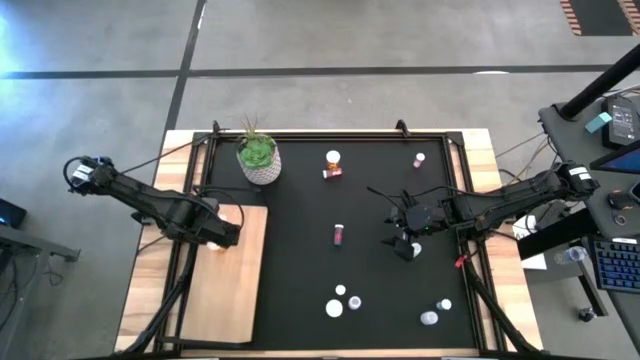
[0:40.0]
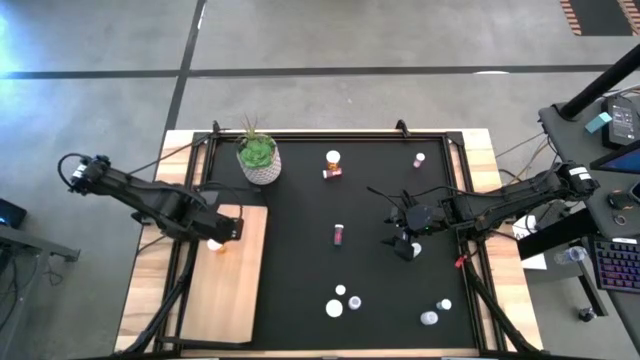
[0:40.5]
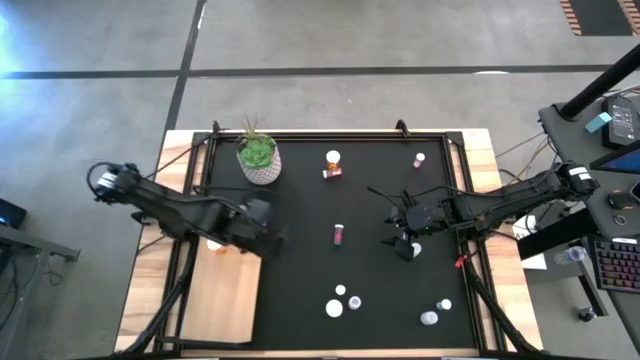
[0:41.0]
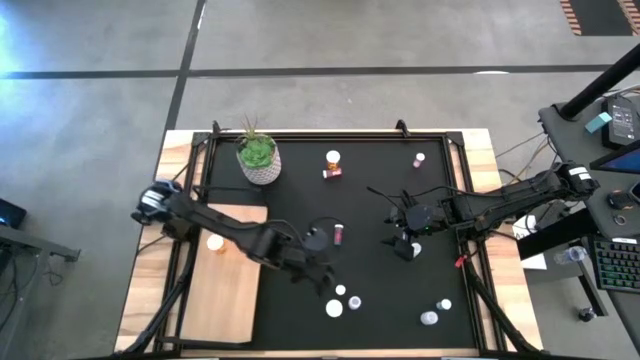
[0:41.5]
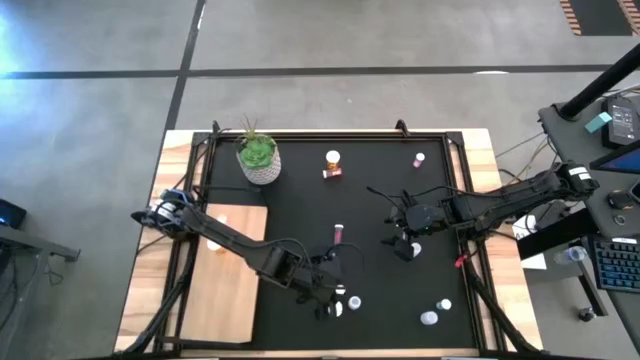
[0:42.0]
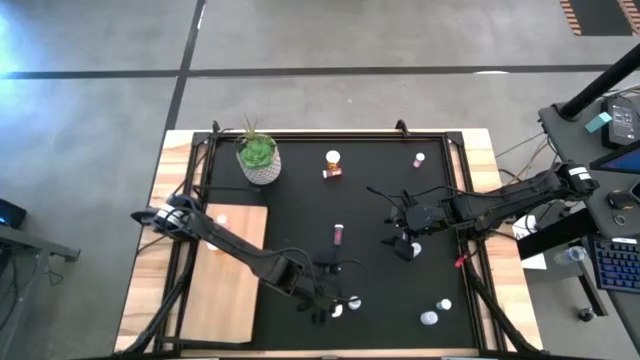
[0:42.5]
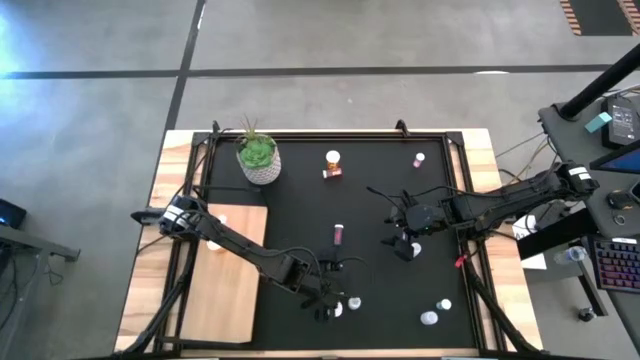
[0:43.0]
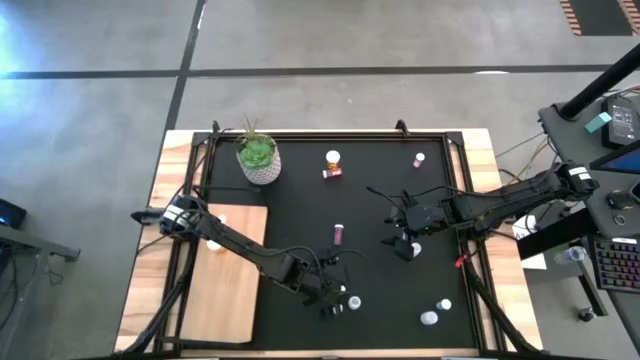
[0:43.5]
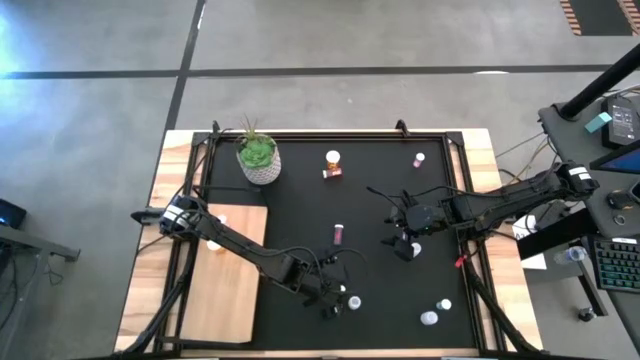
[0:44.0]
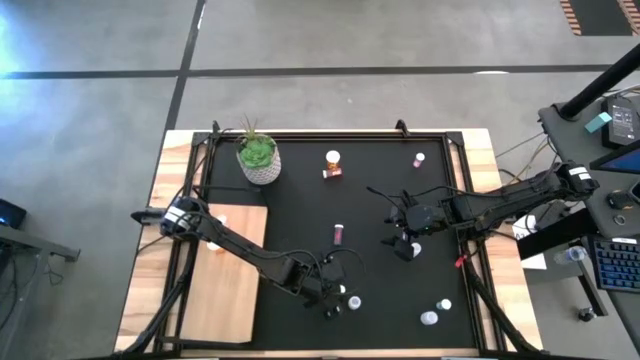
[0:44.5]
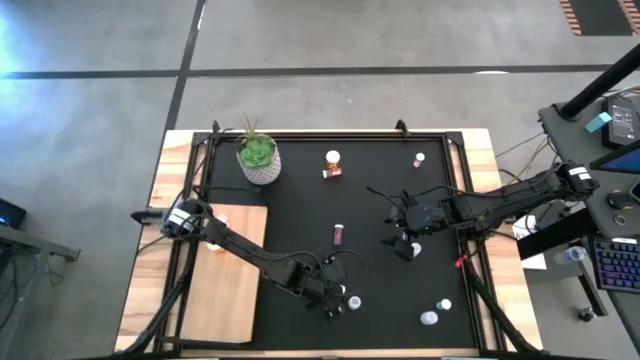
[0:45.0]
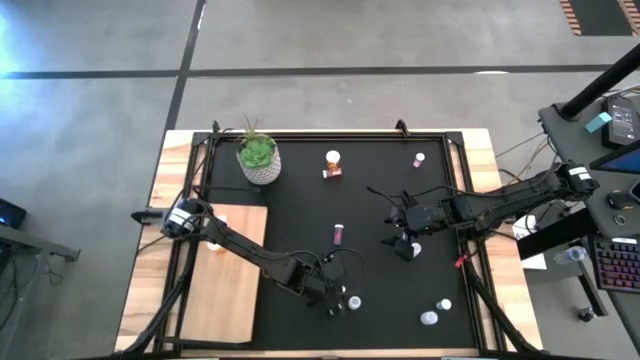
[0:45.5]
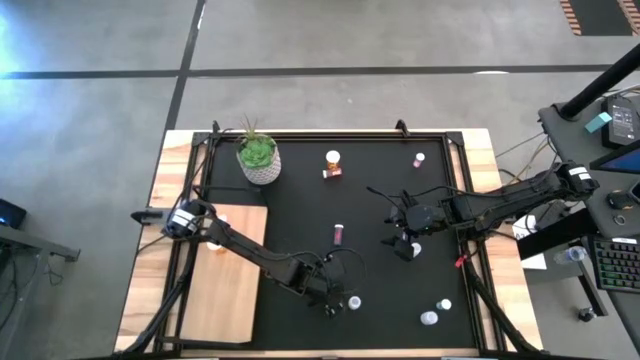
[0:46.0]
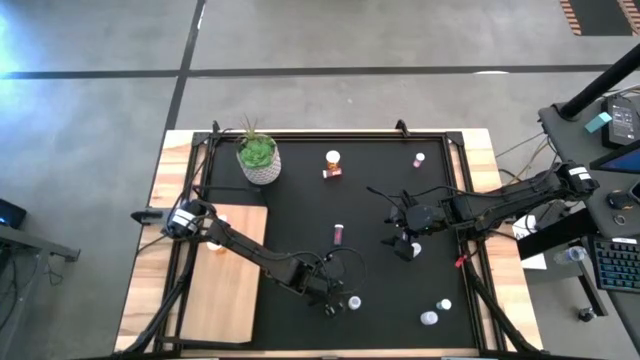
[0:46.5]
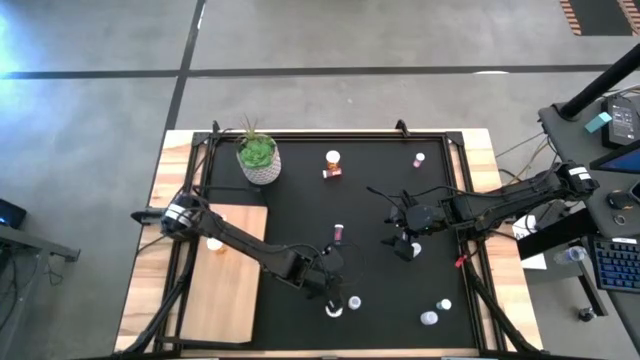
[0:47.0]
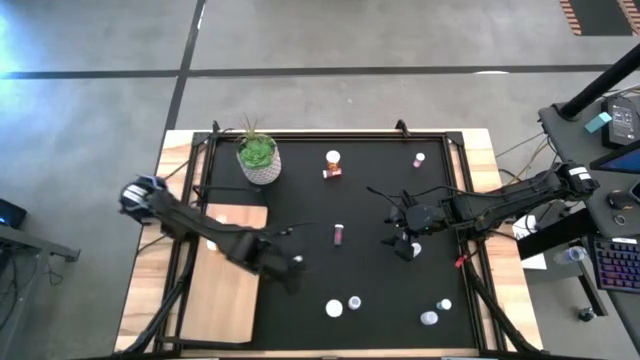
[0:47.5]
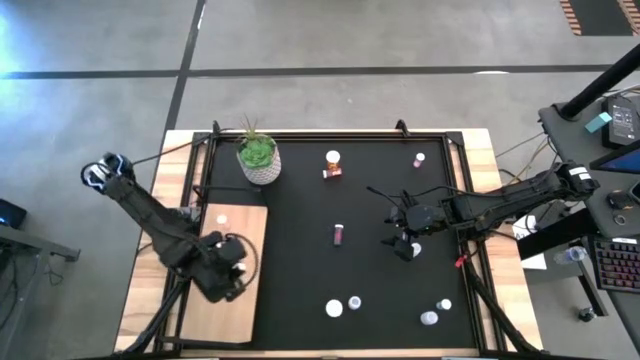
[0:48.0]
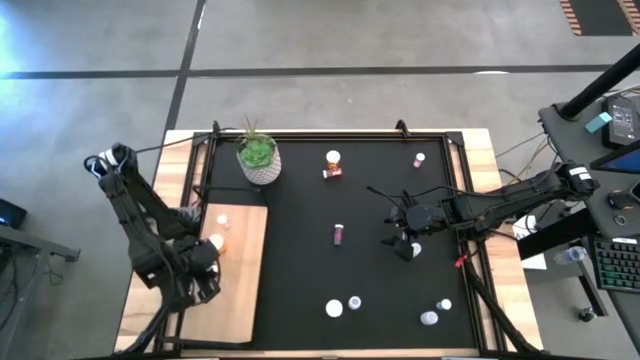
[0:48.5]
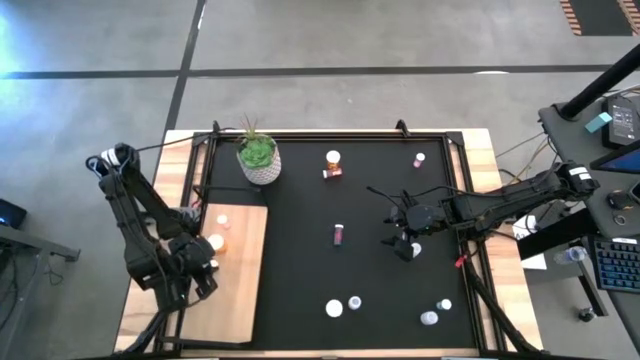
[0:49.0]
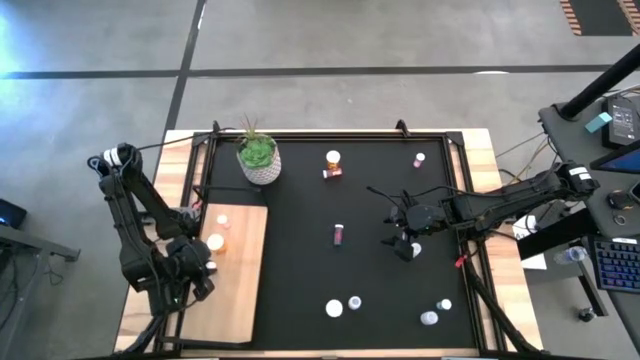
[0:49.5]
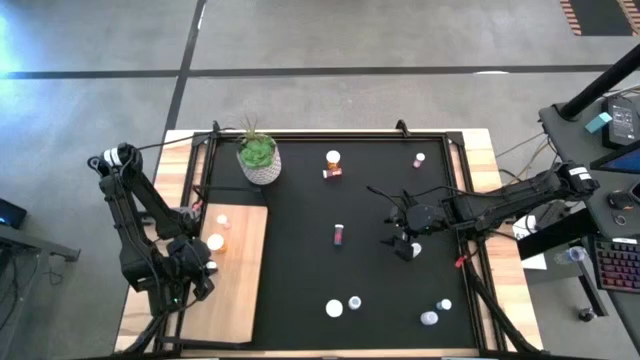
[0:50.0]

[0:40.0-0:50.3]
Task: Pick and place medicine bottles onto shelf by color
Put the bottom left blue pill bottle on the shelf

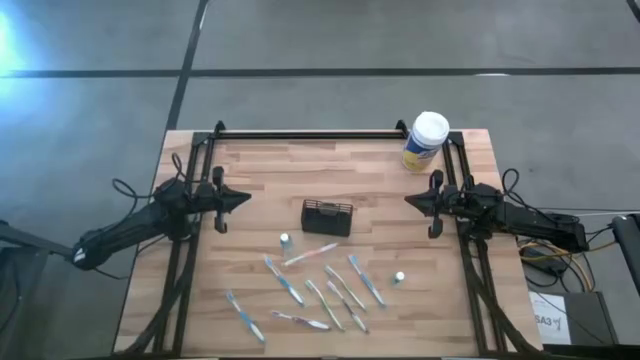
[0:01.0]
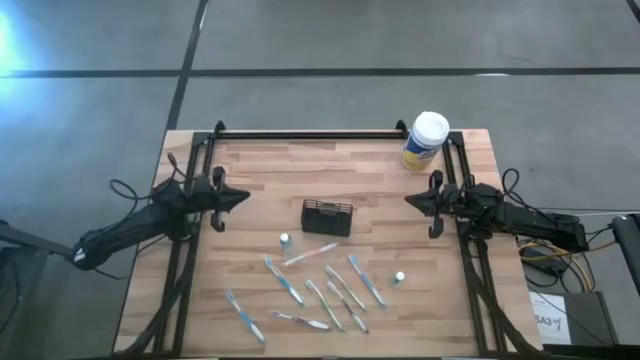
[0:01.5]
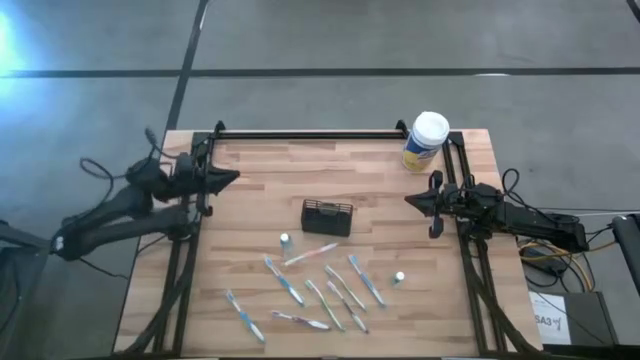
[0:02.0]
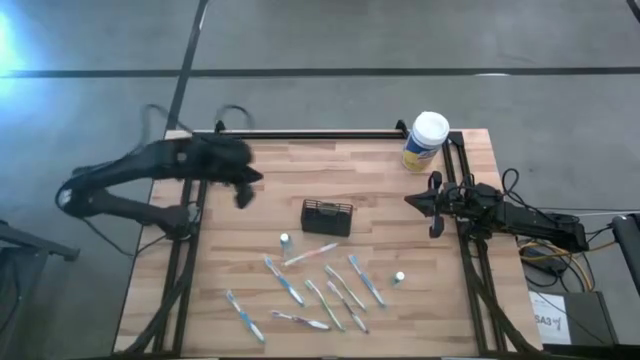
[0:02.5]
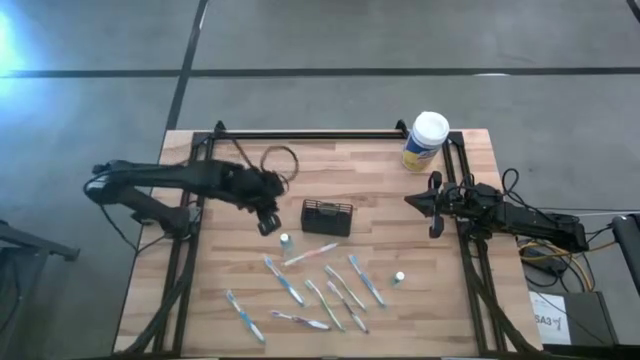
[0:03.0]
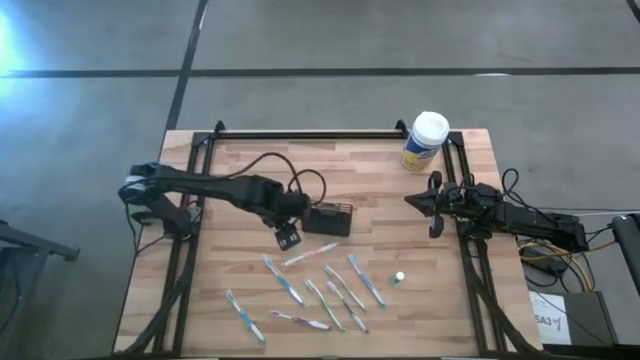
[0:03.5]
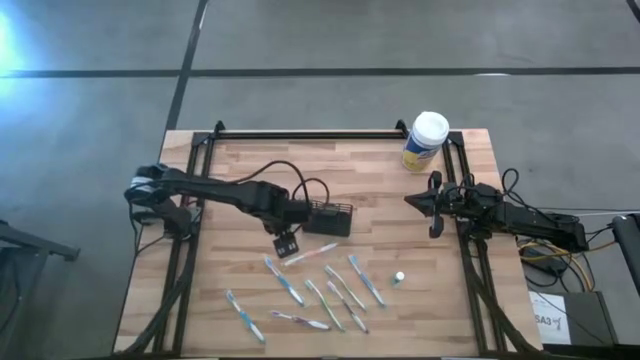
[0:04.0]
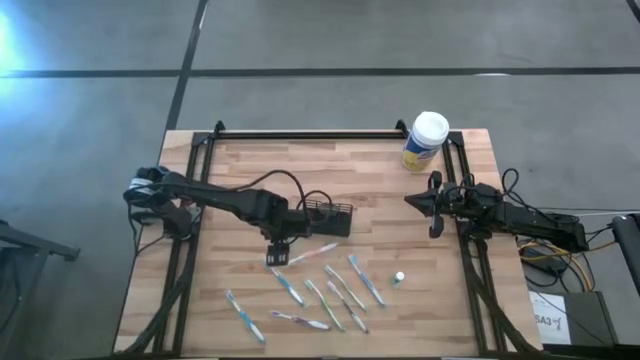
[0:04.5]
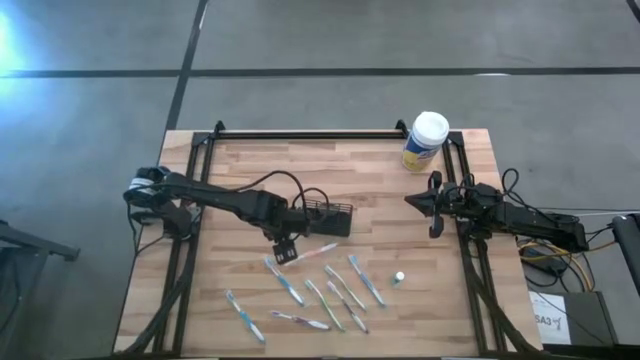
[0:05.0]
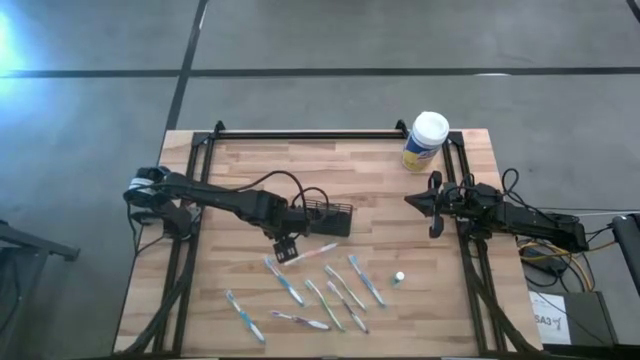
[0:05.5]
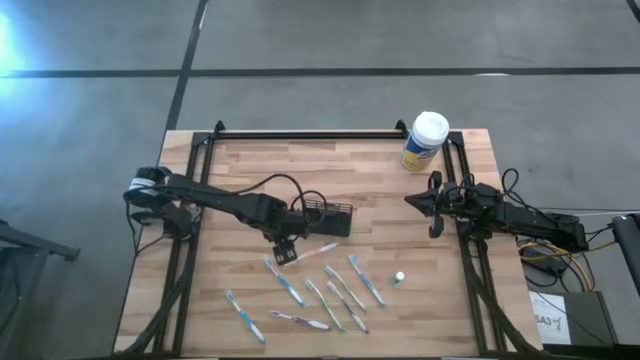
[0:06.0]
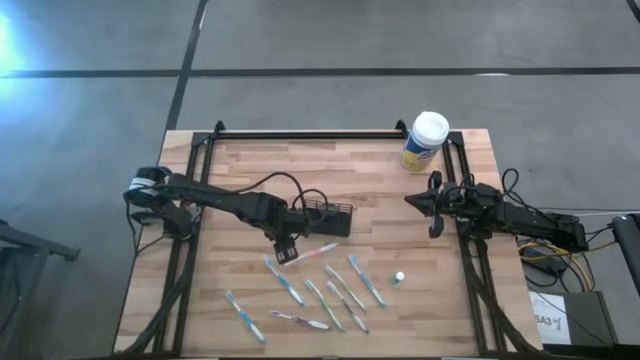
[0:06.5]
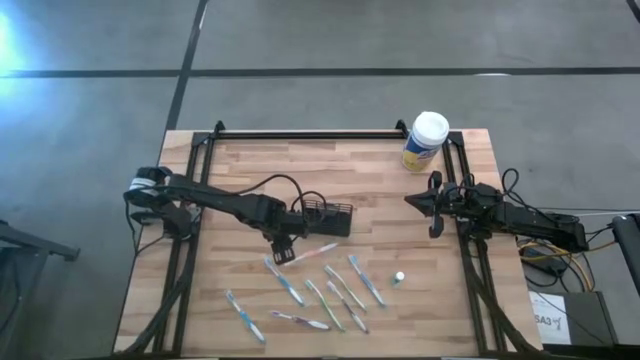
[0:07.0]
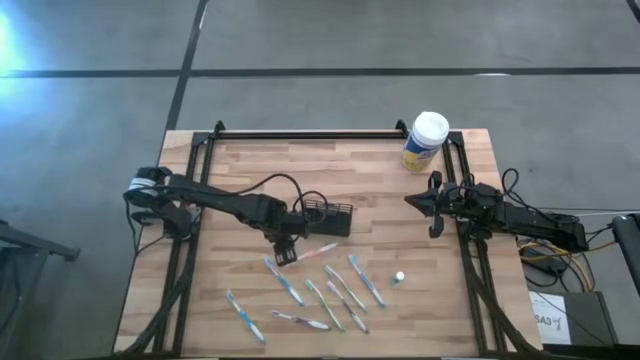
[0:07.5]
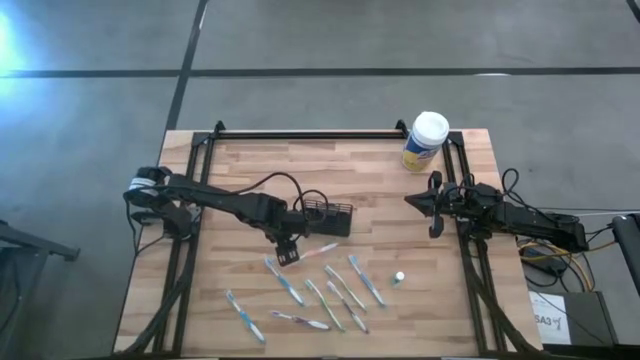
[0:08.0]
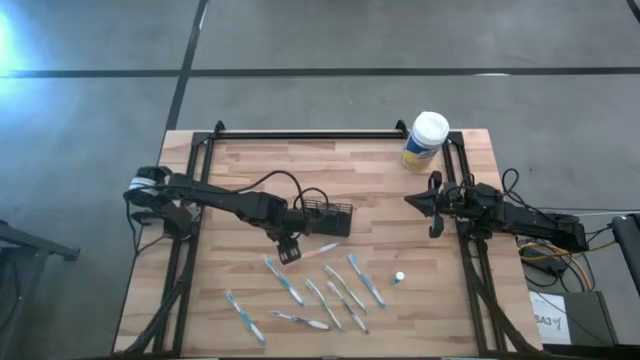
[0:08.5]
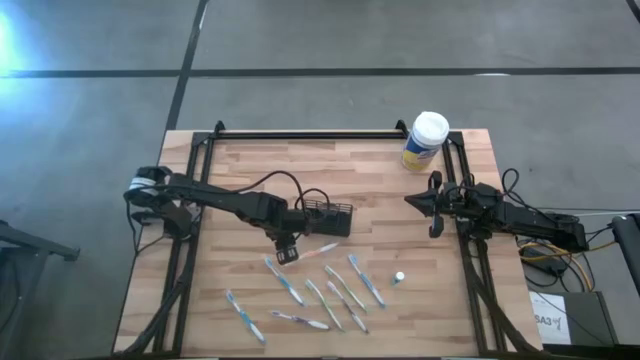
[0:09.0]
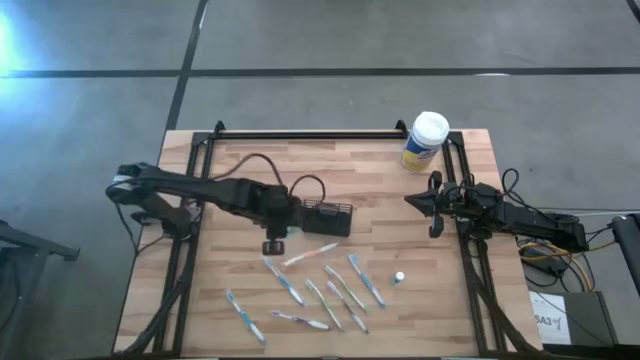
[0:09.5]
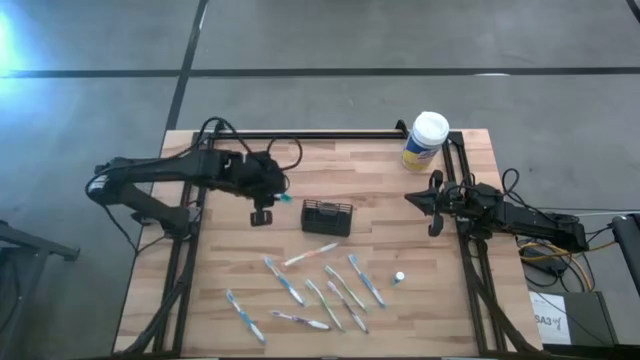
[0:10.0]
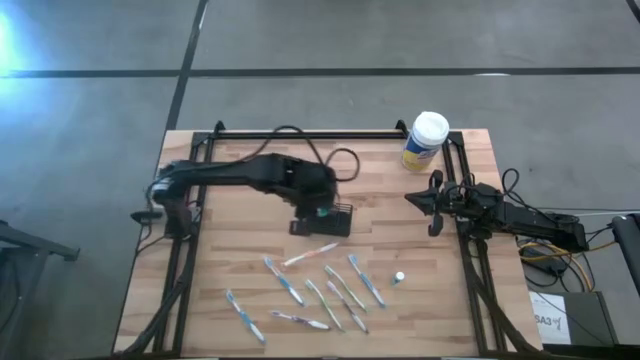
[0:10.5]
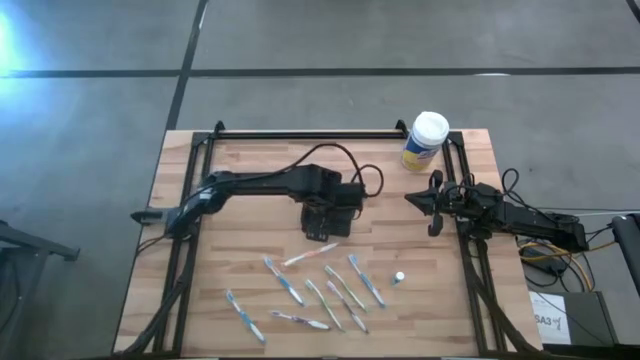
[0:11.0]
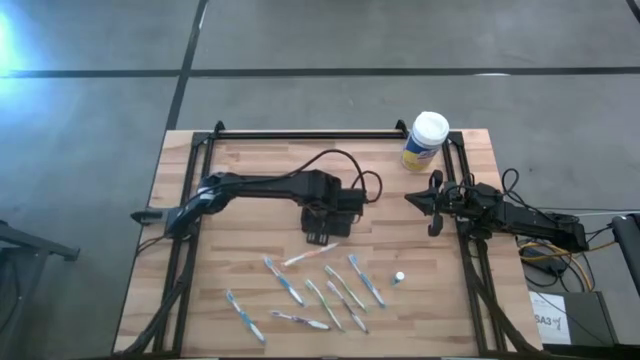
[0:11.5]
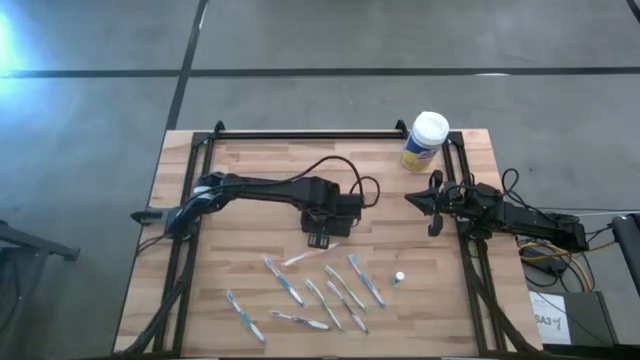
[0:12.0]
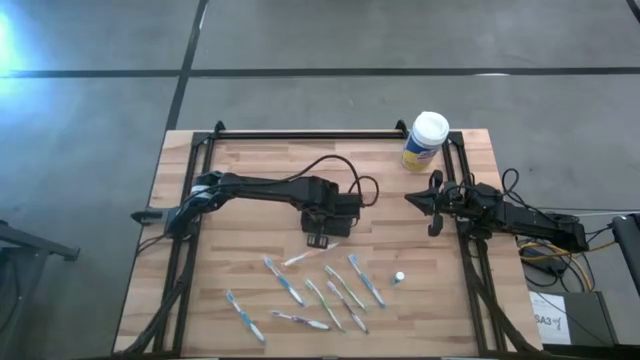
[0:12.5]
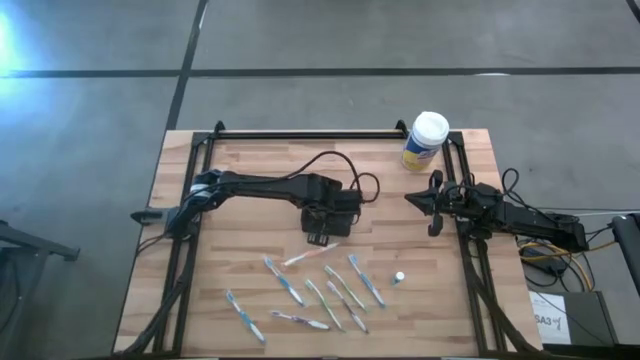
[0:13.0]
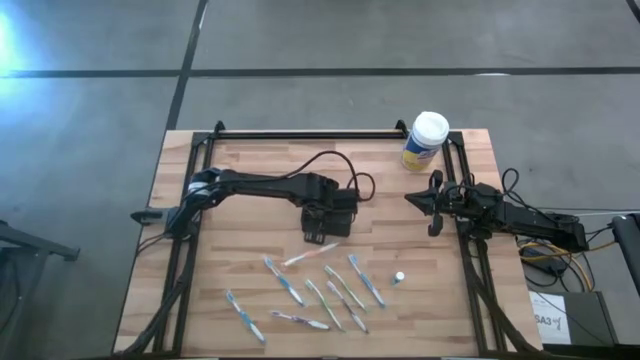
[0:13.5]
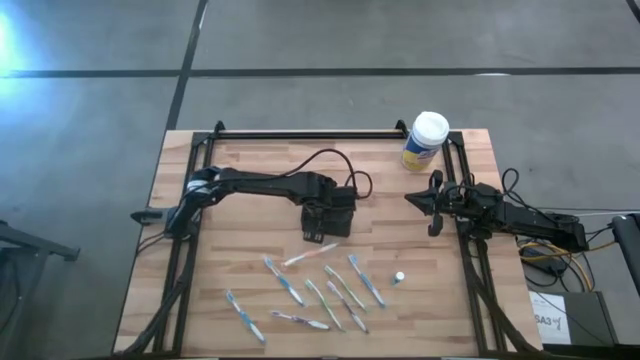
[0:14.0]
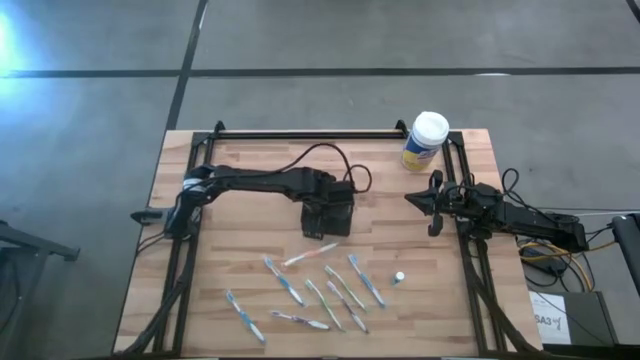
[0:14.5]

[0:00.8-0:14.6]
Task: Pick & Place toothbrushing station
Put the left blue mouthwash into the black mesh organizer
